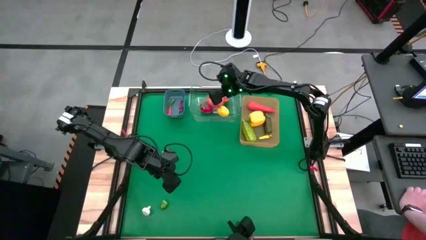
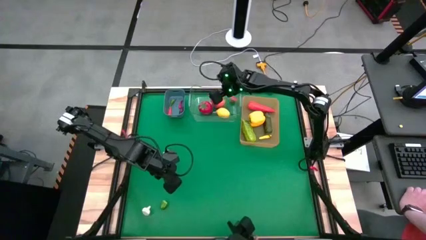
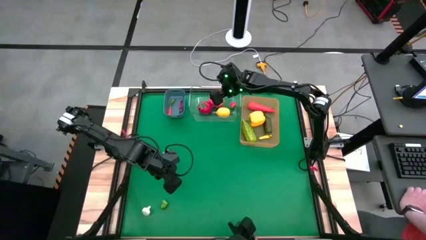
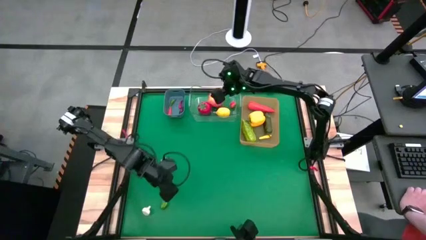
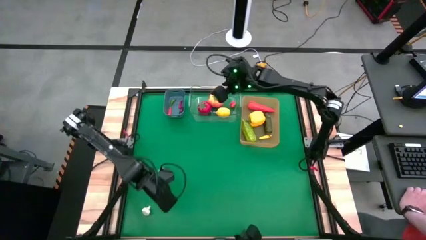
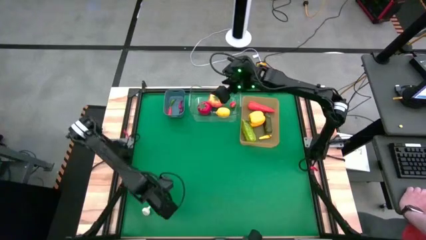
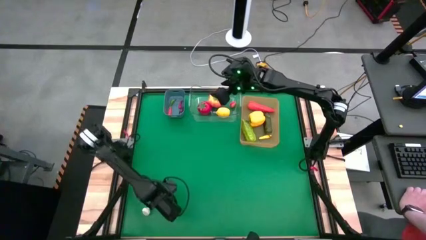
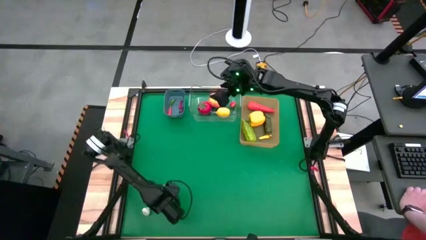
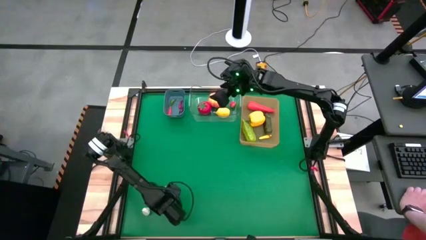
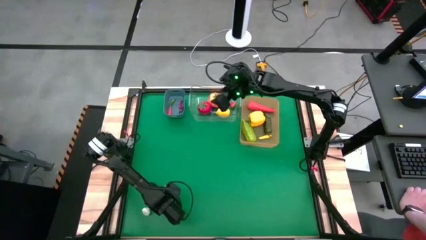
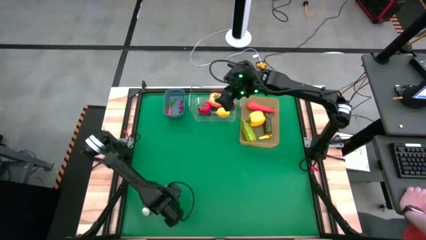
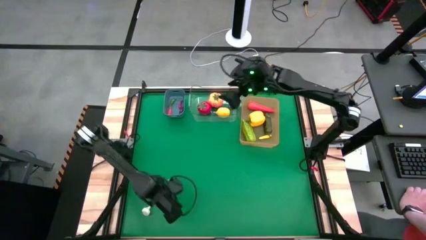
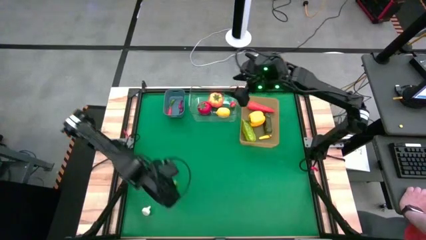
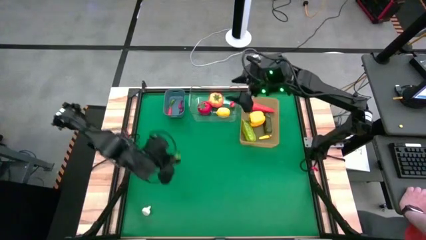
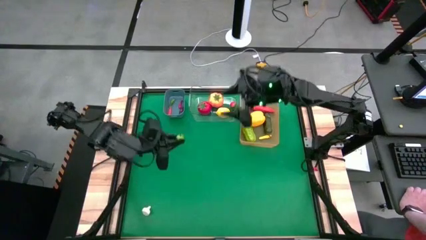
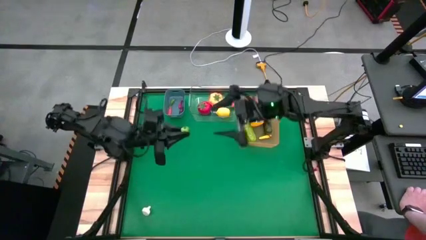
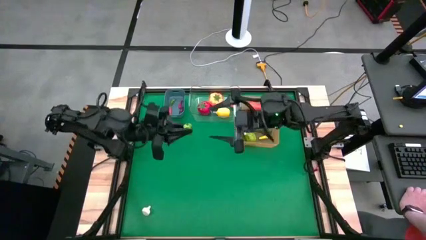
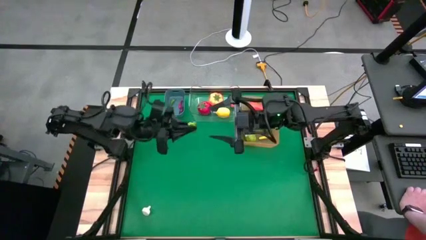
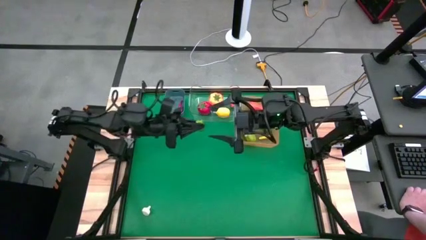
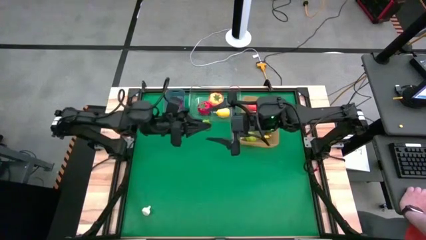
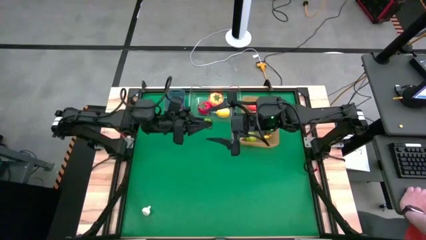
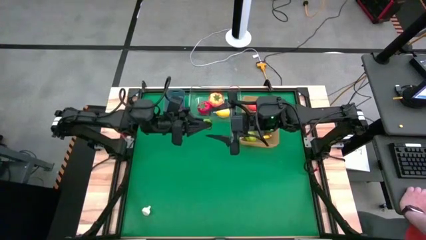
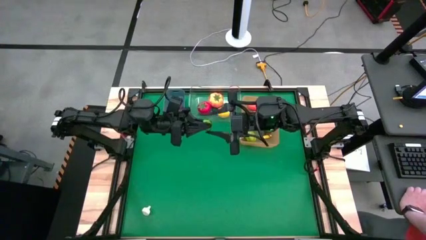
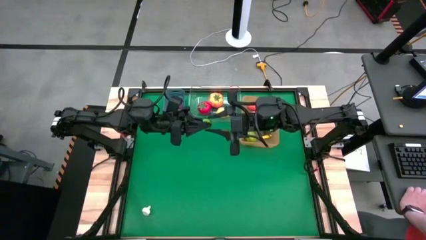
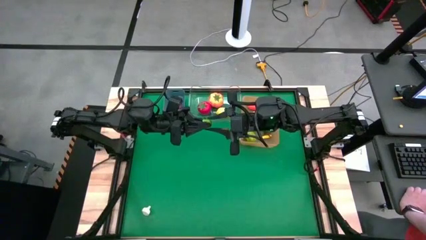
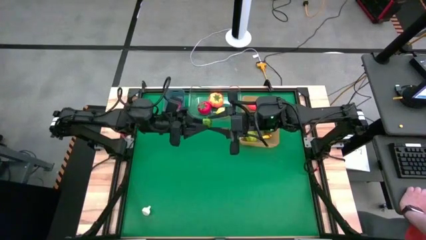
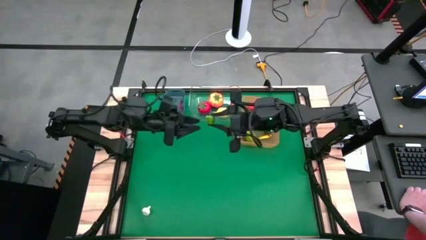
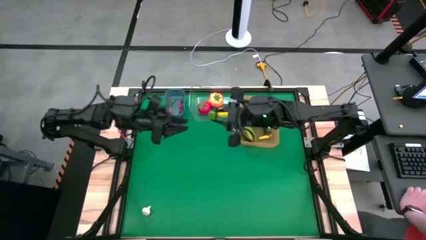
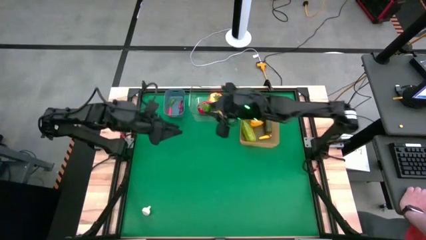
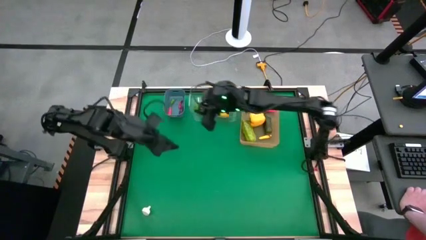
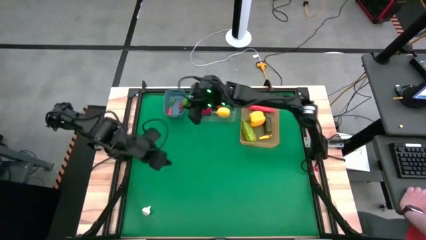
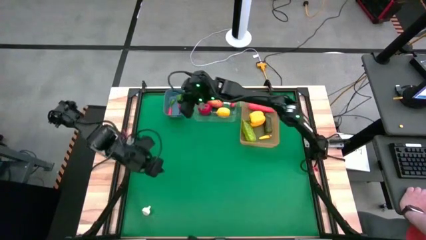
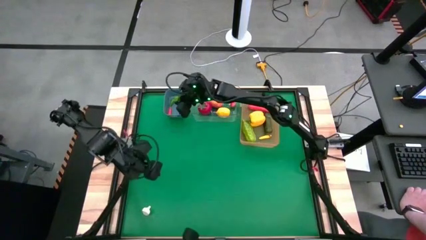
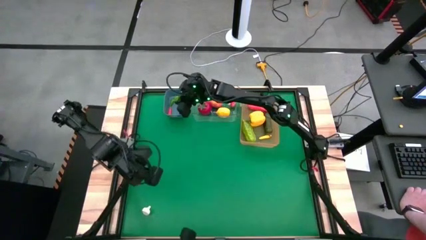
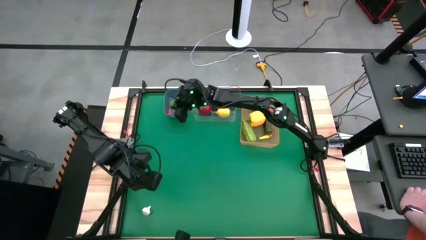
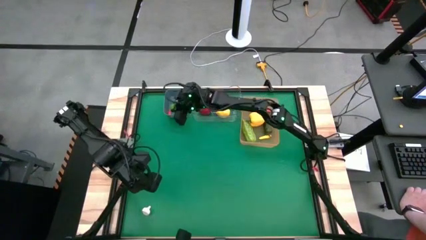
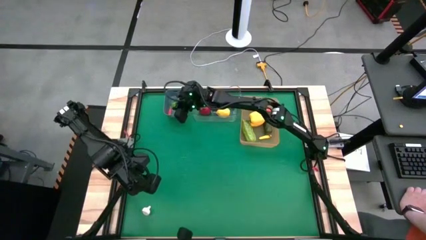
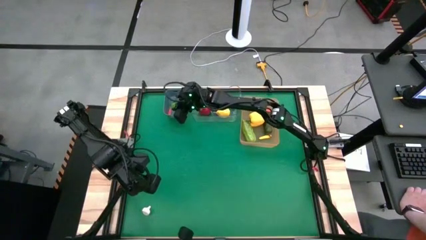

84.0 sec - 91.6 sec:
Task: Sort produce into baskets
Put the green chili pepper into the blue bin

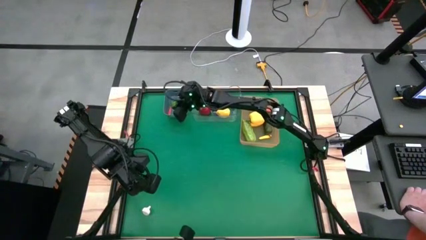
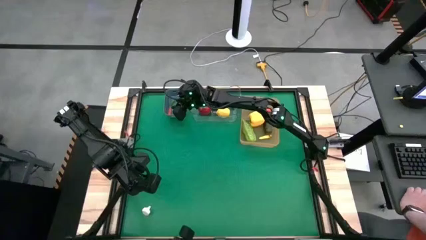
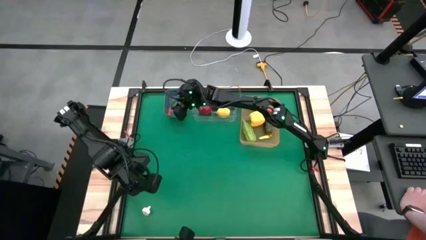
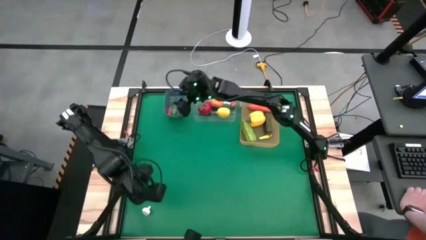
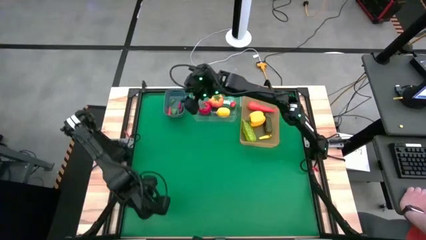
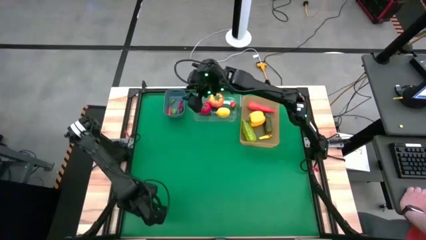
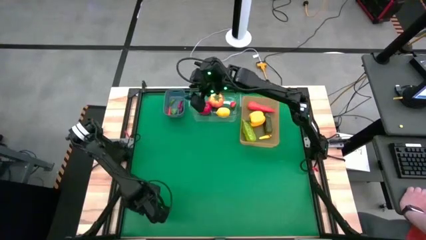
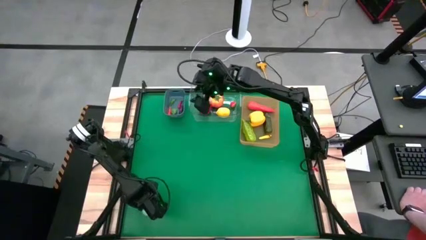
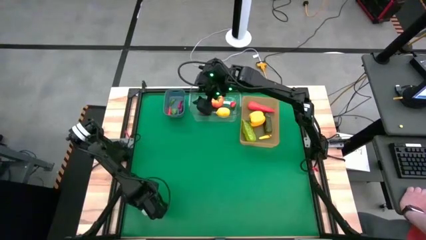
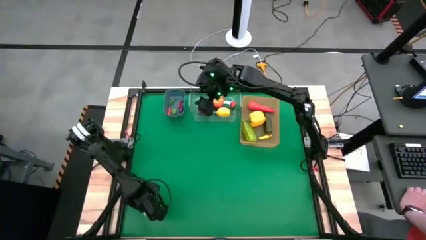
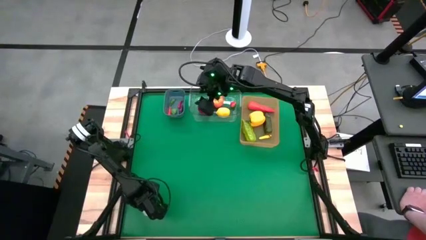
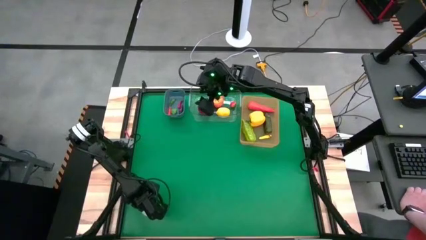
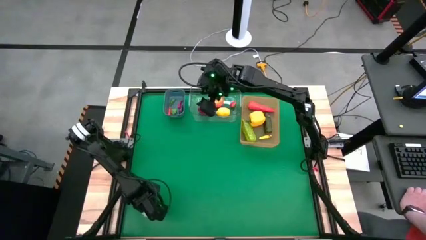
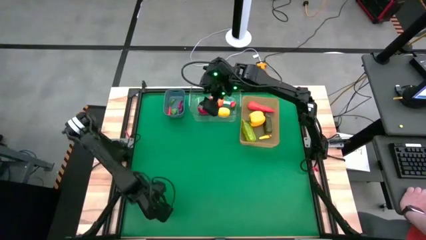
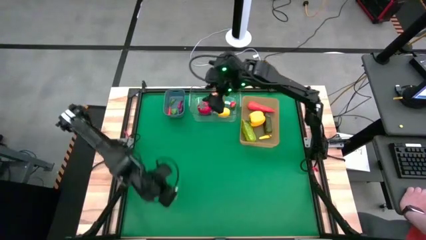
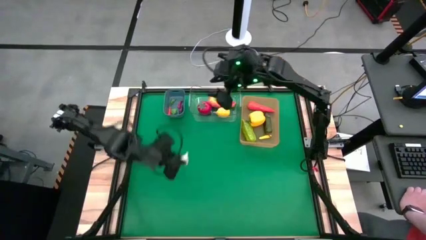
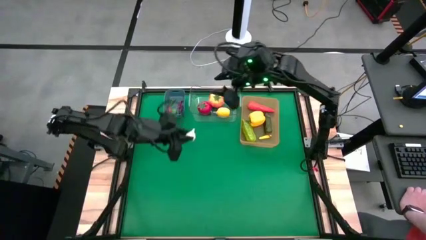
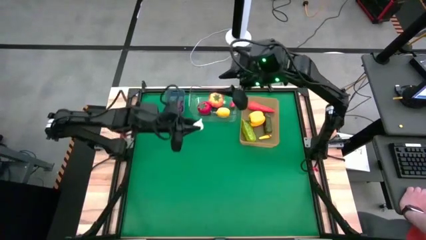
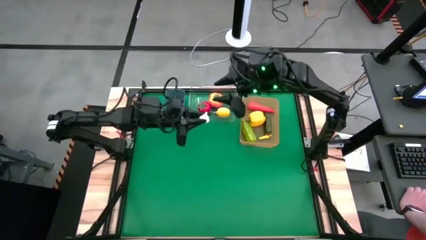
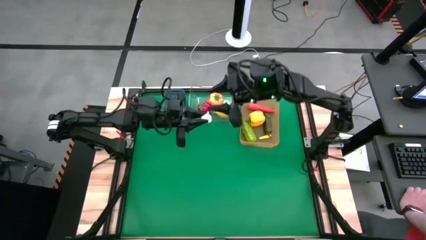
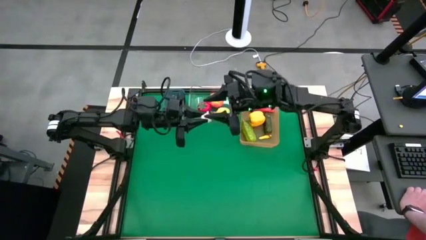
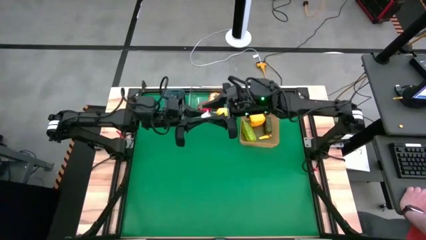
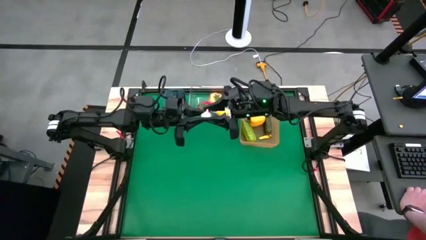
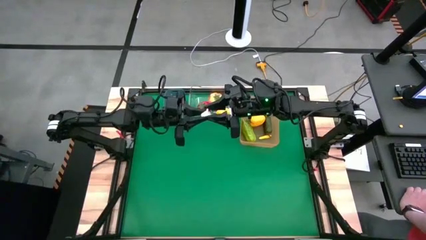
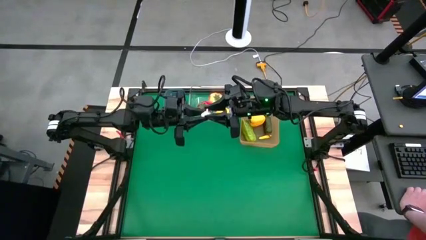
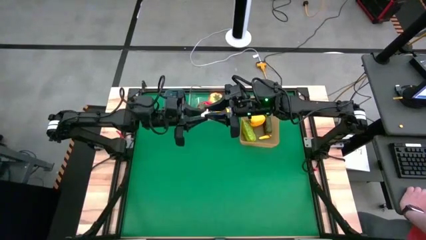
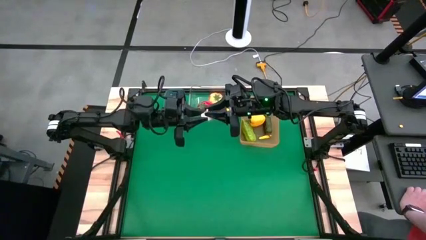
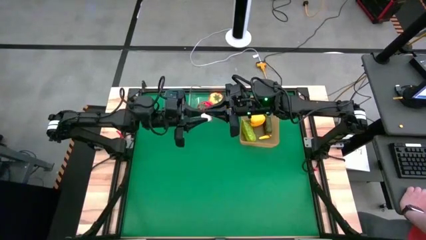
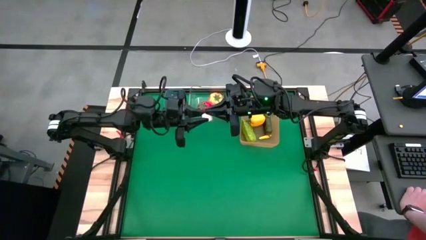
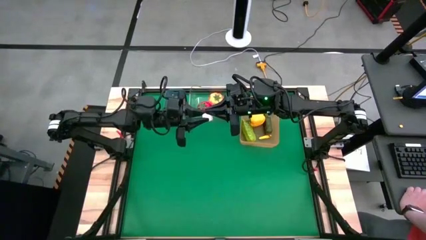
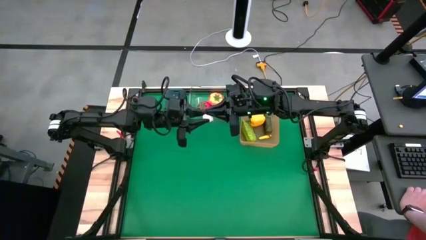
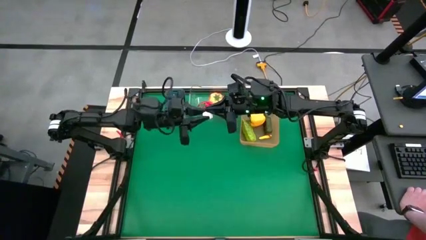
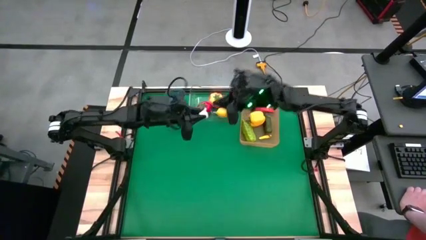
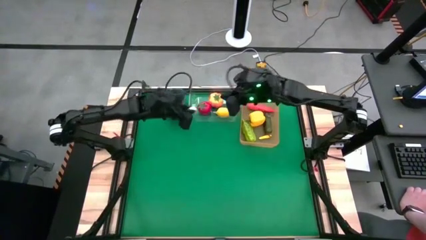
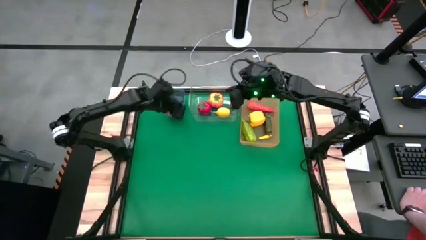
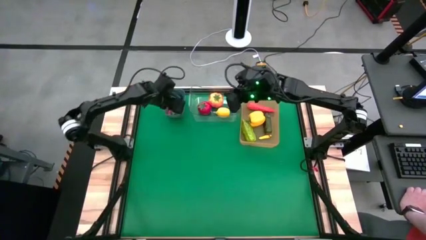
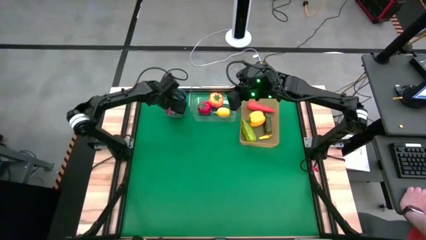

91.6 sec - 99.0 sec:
Put the garlic into the blue bin

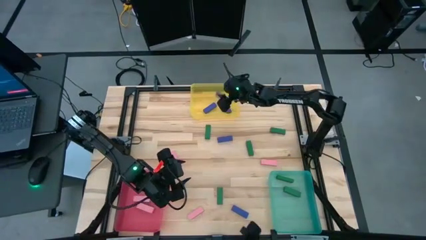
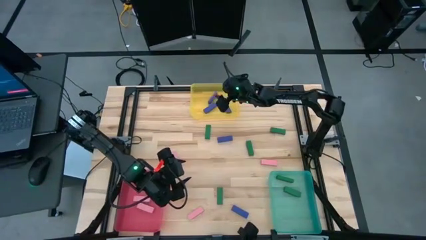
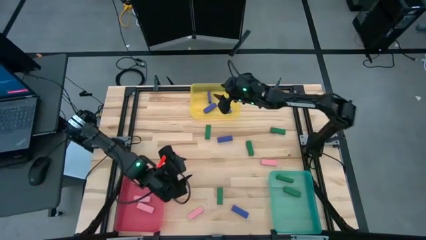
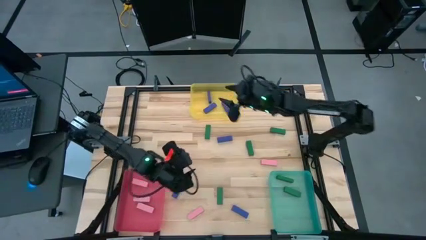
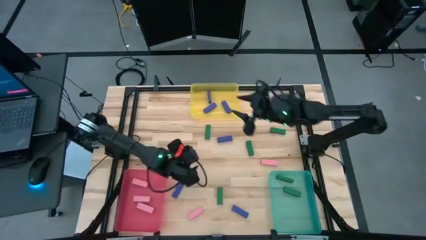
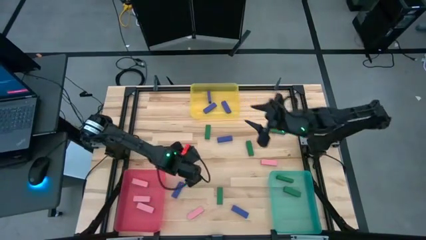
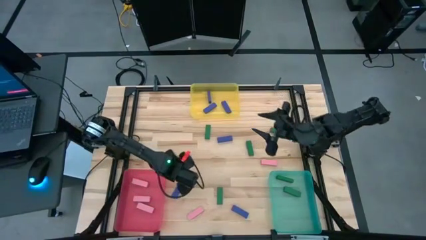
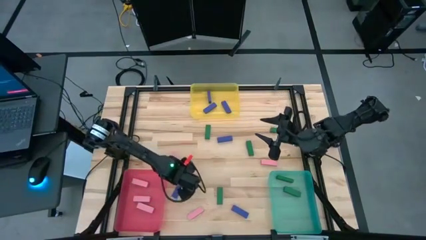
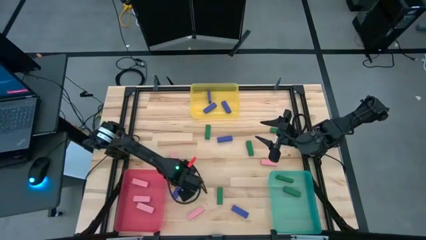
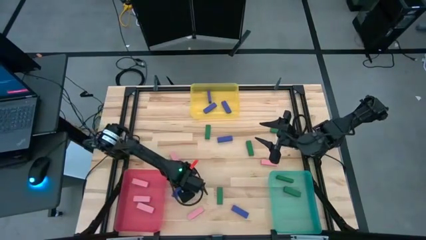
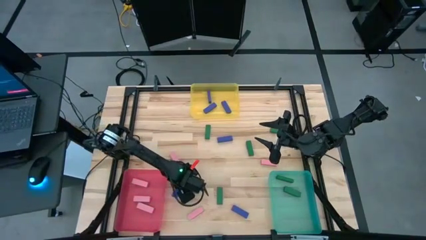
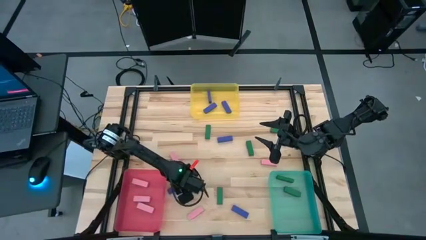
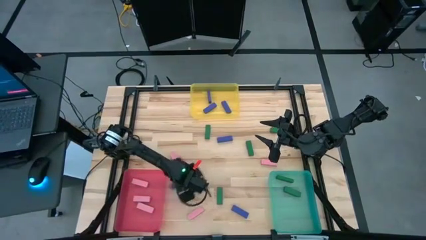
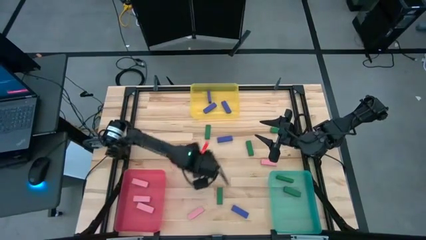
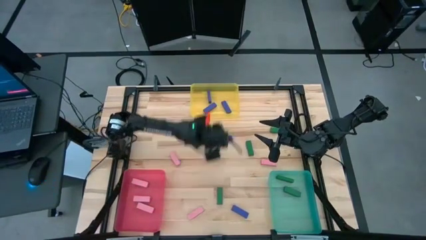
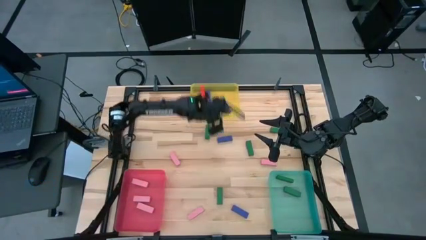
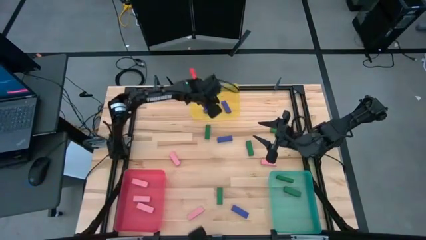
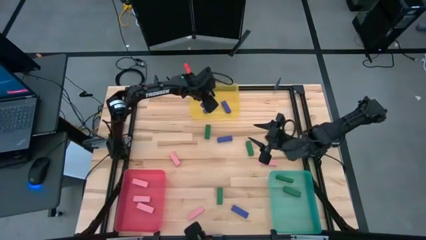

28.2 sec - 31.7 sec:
Task: Sort blocks
Put the blue block into the yellow bin
